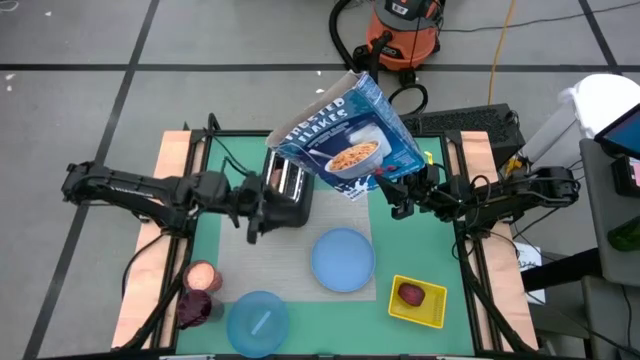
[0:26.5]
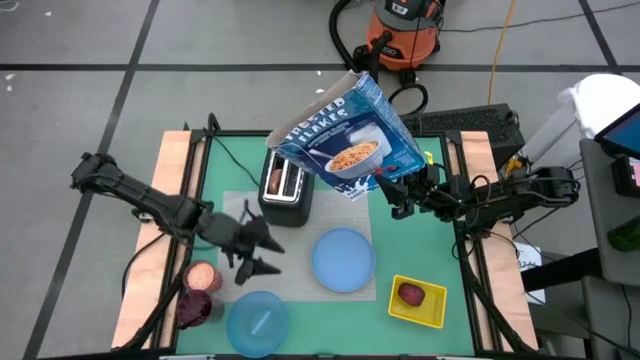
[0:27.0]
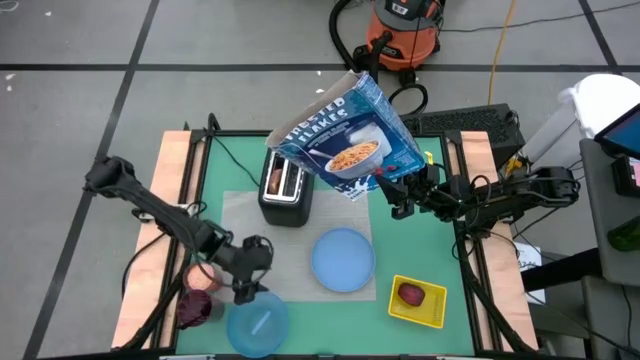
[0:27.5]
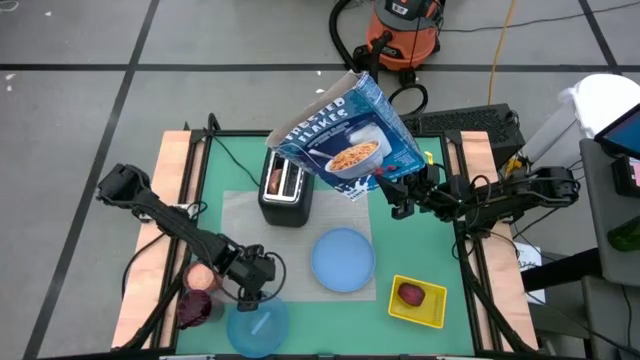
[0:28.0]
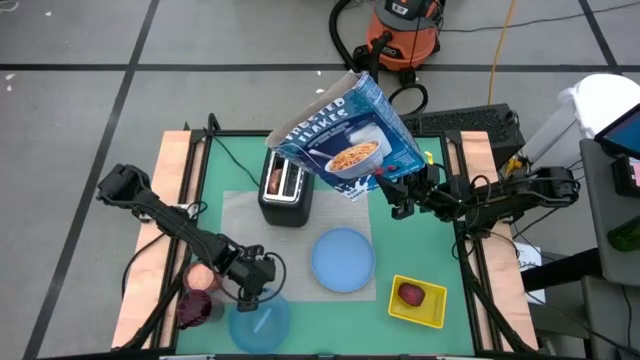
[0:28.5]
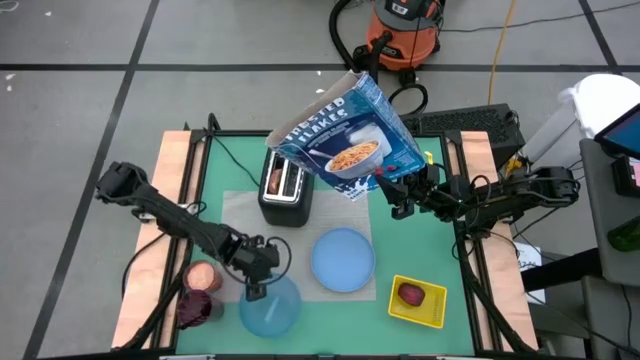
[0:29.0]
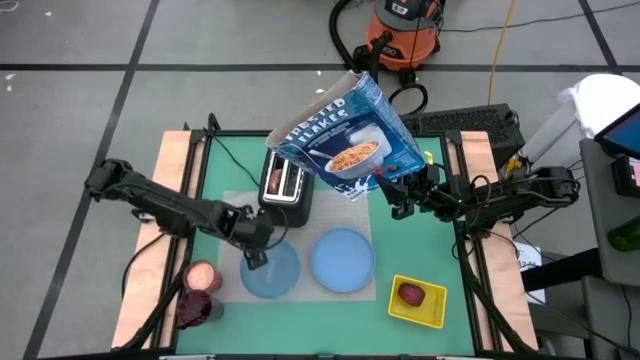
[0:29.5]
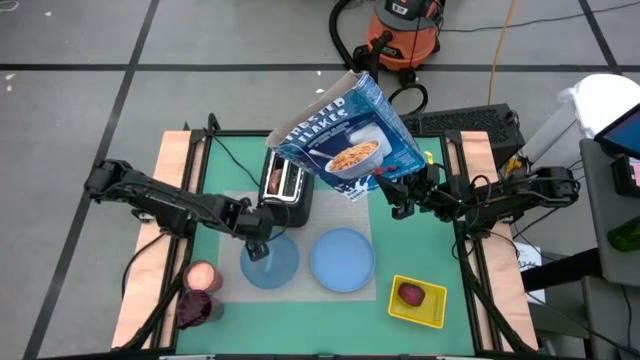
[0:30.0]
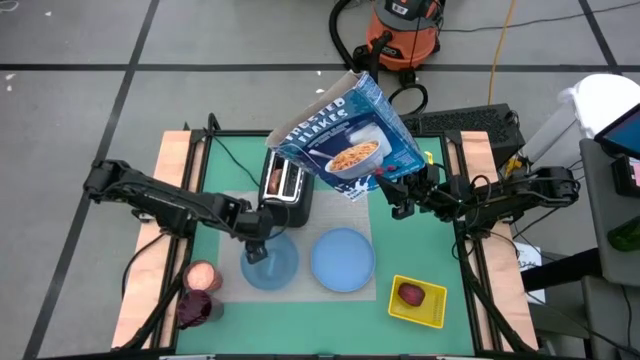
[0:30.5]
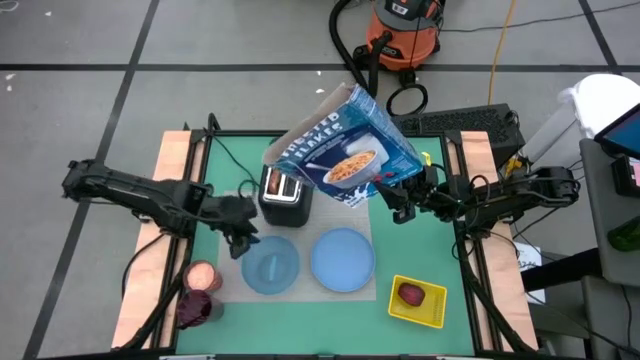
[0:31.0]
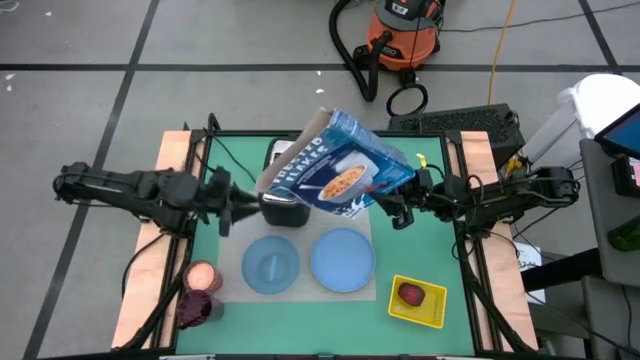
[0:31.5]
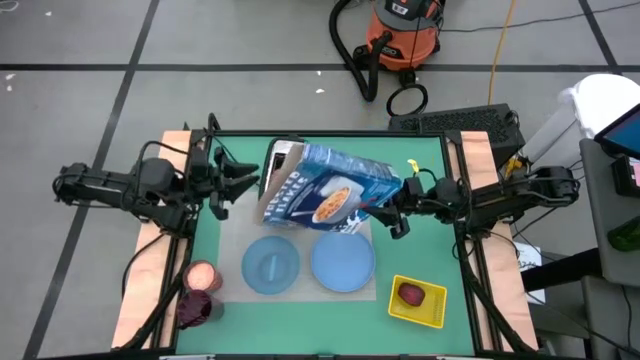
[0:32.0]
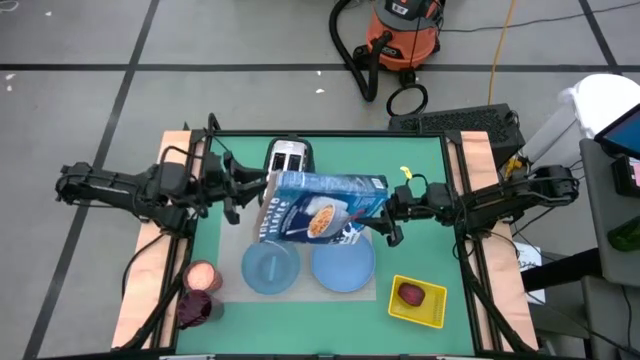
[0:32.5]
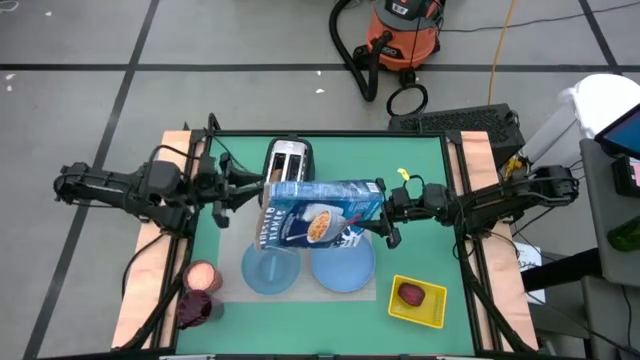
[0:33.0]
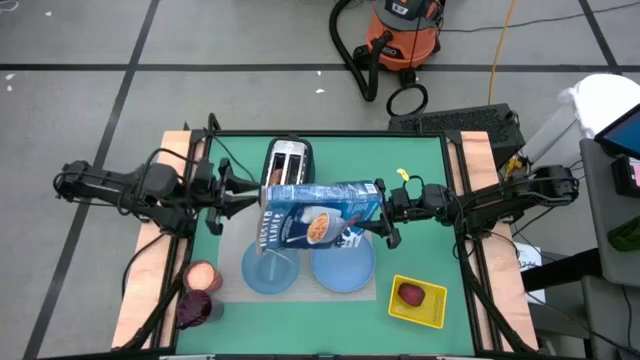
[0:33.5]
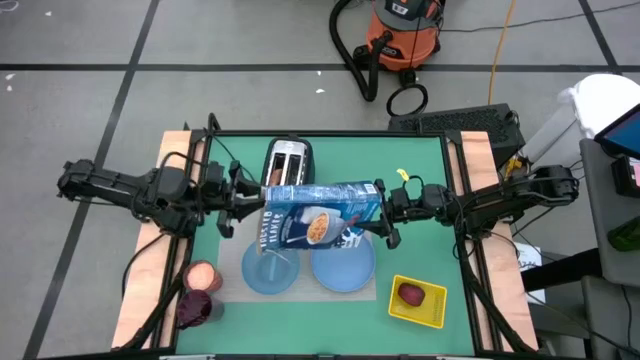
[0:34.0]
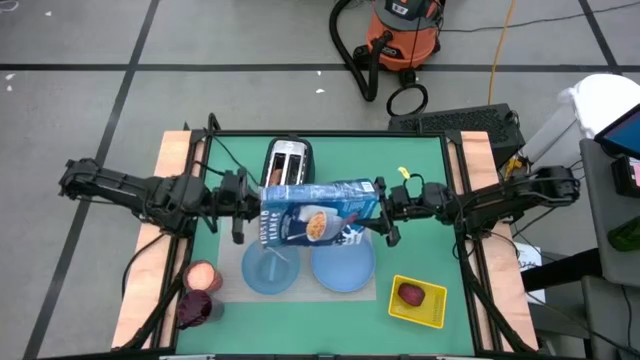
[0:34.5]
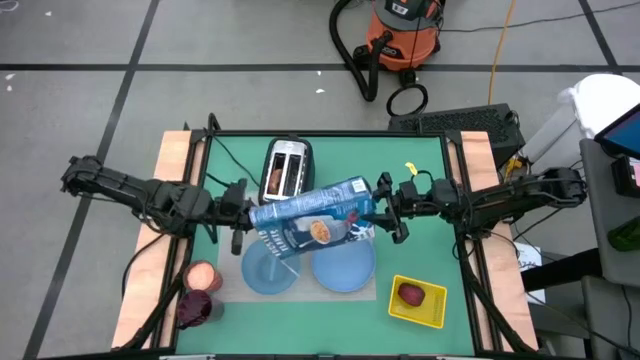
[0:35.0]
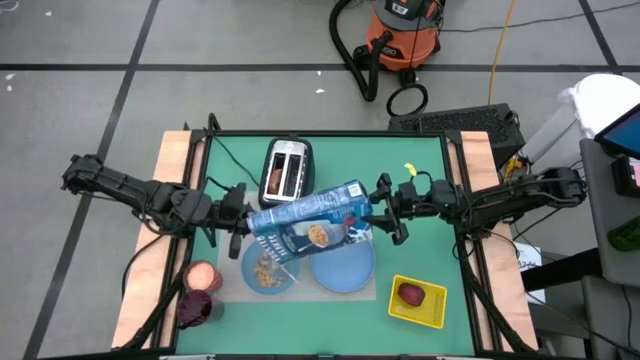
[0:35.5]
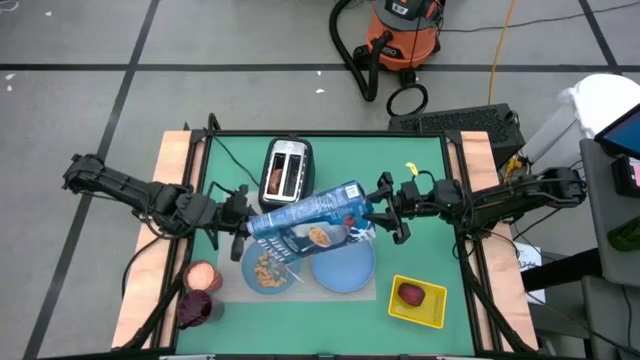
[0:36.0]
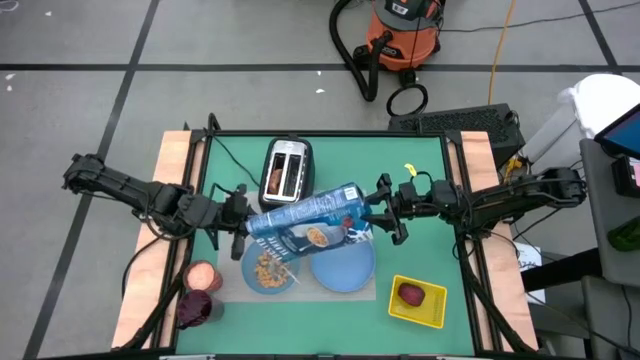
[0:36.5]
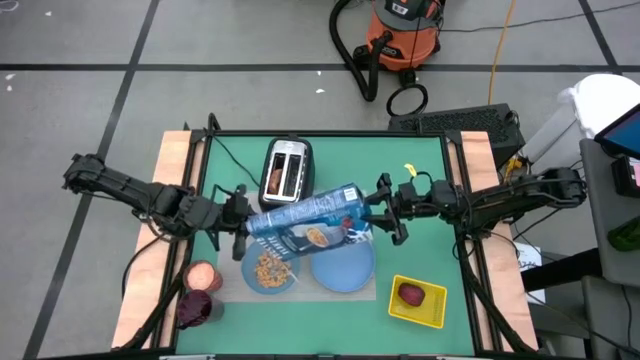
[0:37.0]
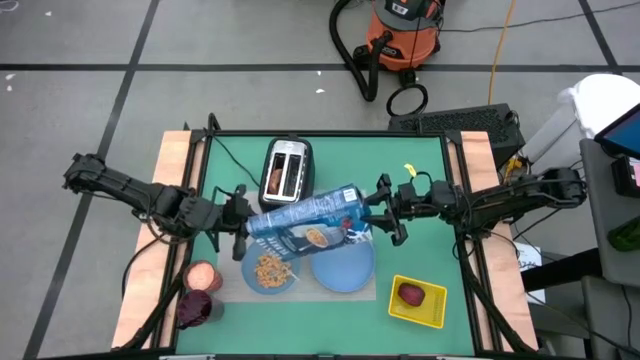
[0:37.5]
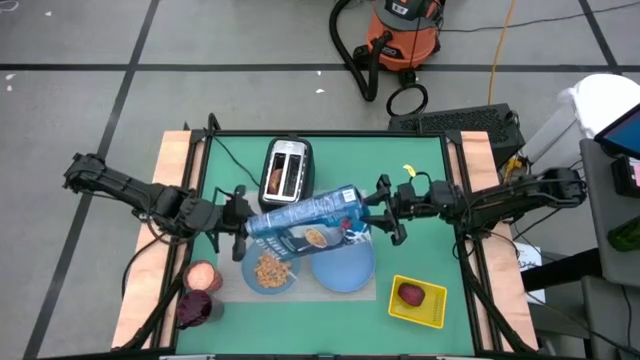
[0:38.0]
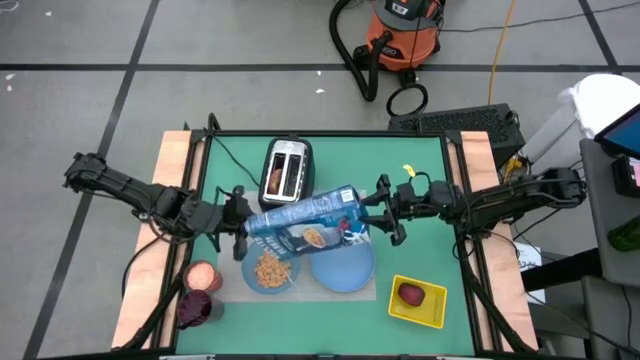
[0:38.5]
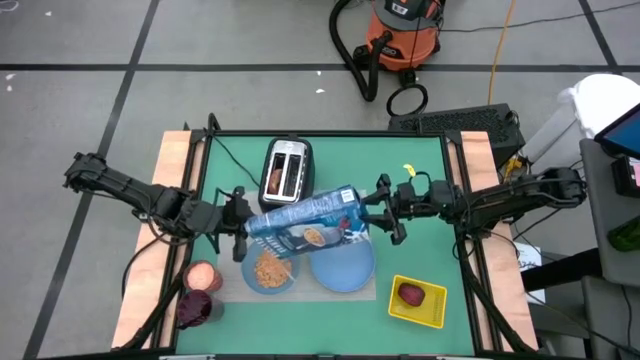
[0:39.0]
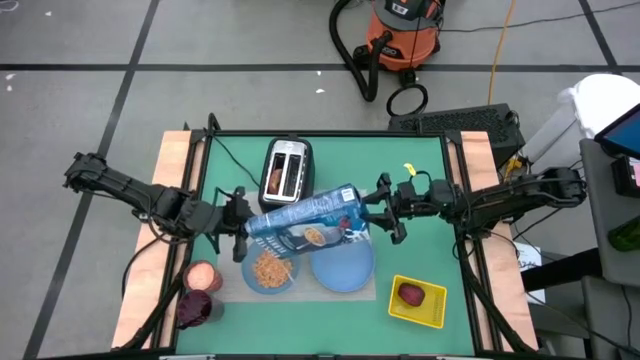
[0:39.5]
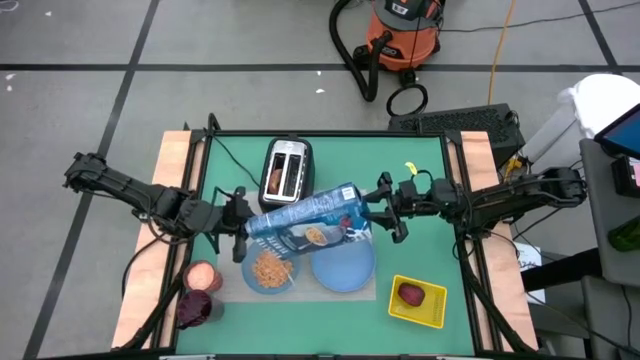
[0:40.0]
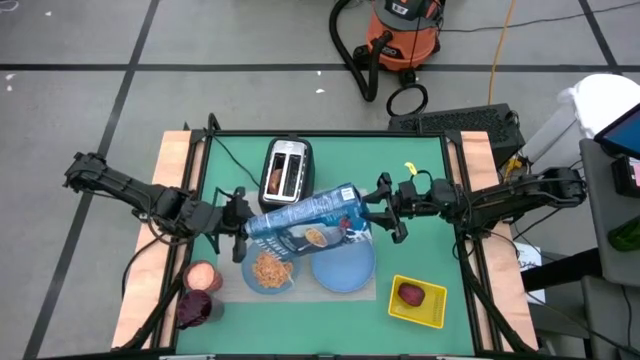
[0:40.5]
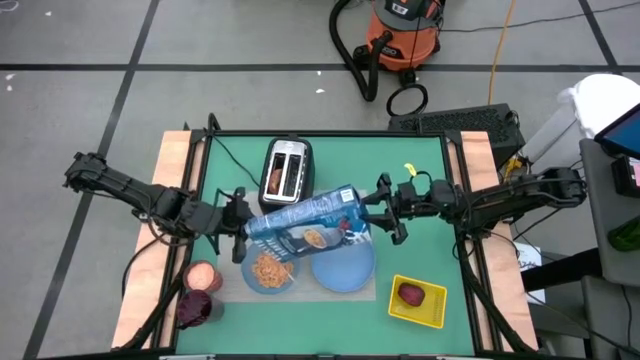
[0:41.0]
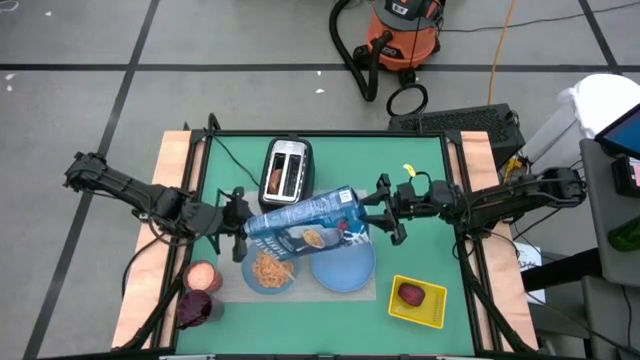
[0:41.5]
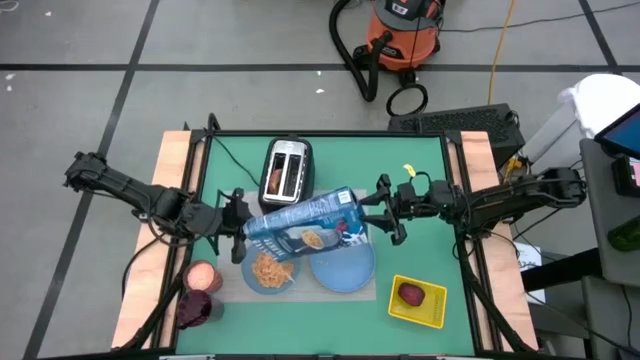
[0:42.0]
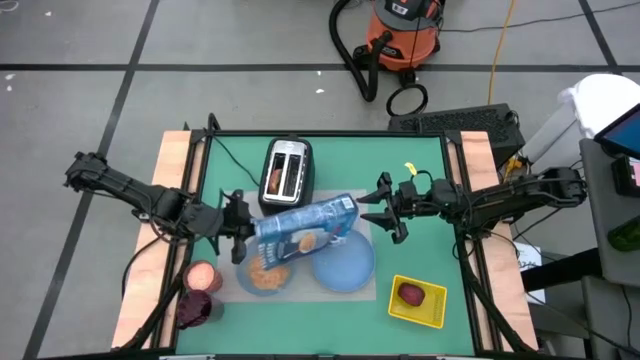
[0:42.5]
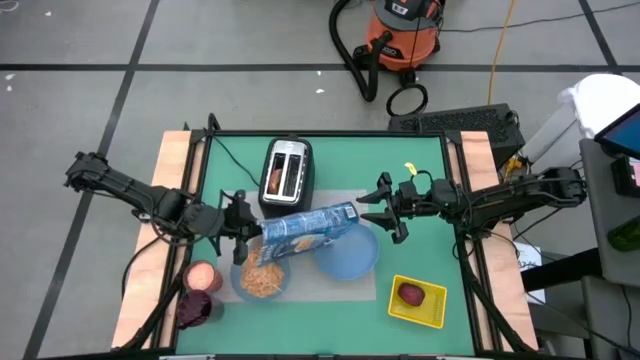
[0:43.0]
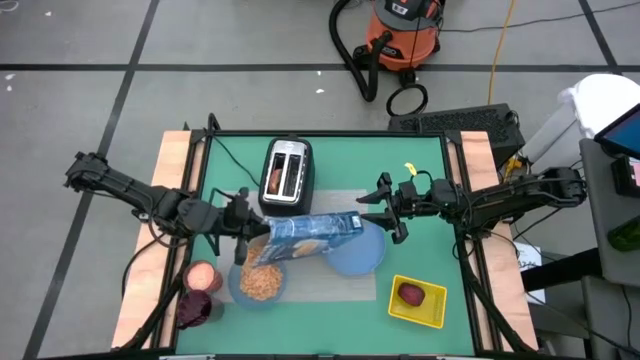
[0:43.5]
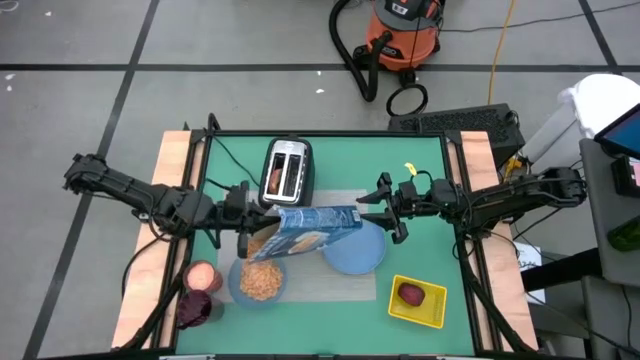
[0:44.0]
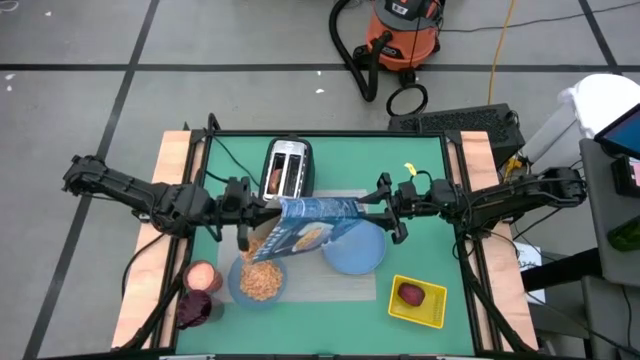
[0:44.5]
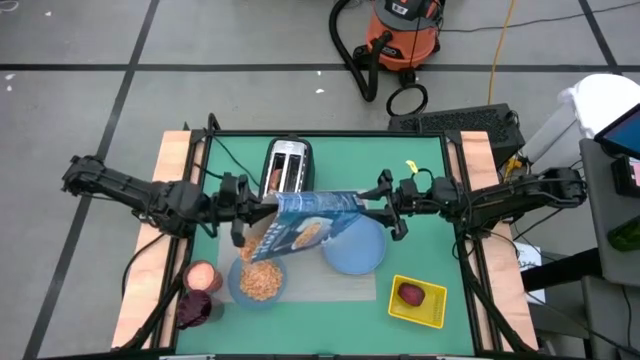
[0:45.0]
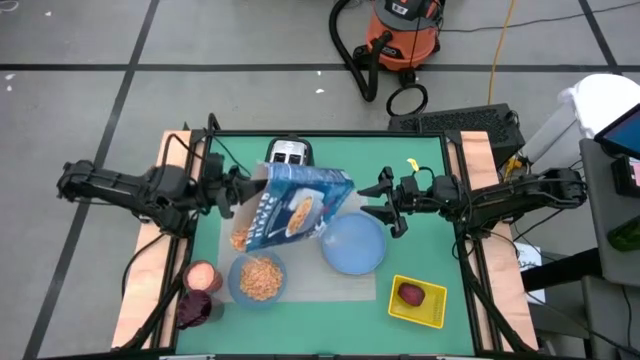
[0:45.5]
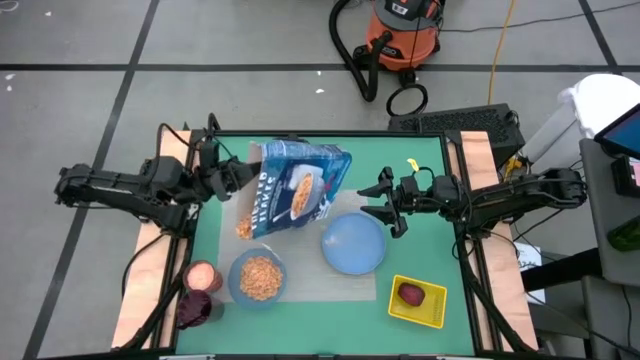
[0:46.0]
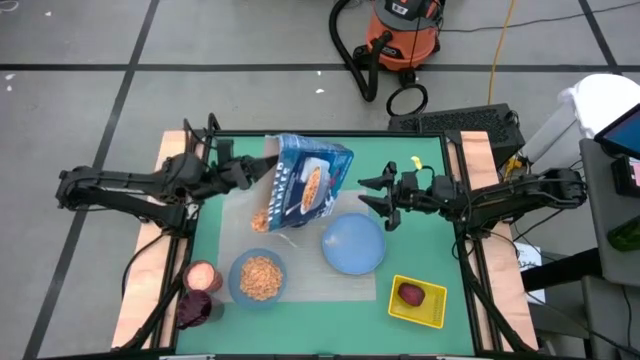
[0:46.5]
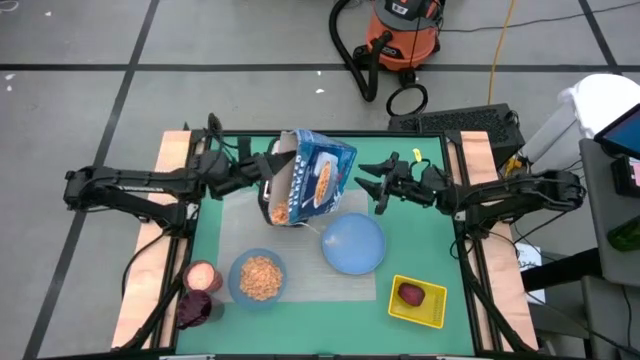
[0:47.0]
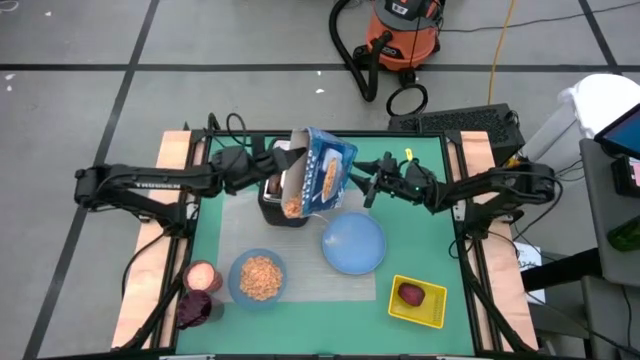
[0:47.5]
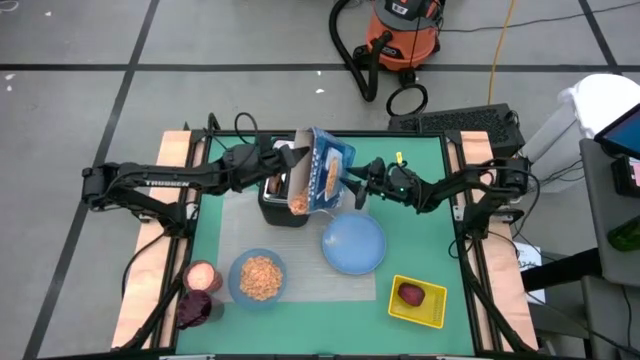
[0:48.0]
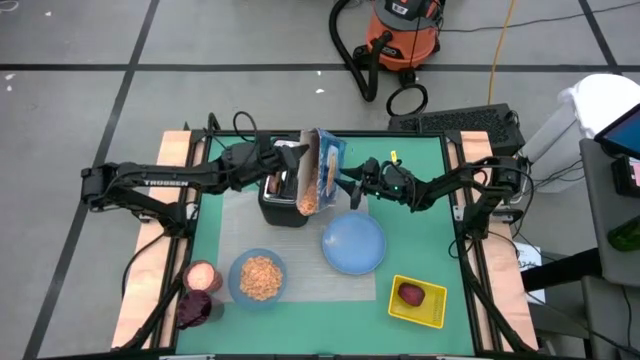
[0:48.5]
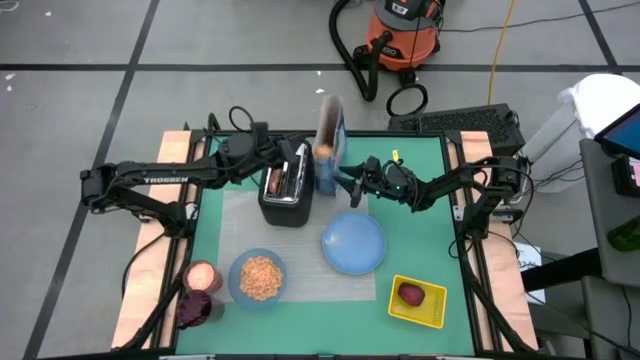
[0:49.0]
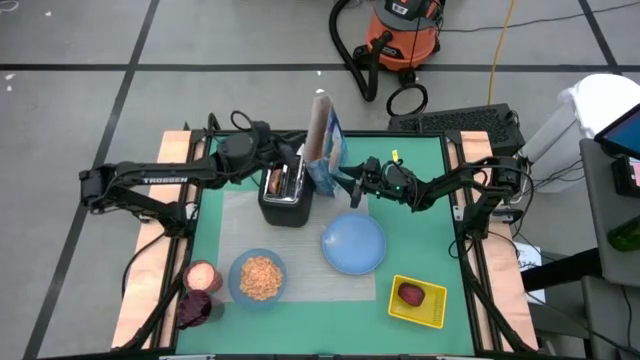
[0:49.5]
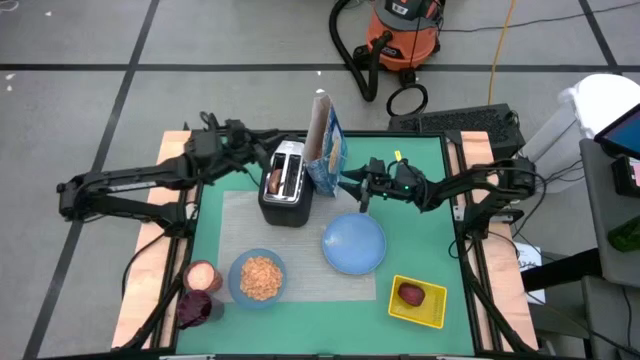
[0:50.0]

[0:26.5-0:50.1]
Task: Arrange a breakfast setting
Pour the cereal into the blue bowl
